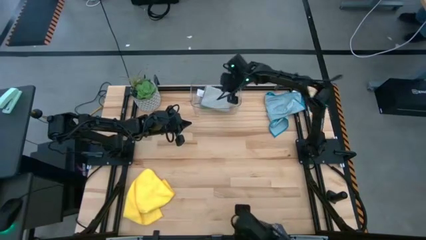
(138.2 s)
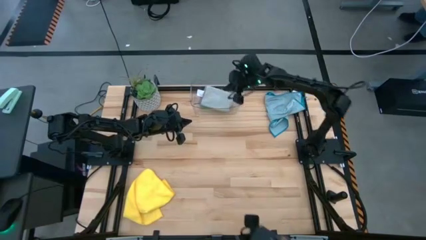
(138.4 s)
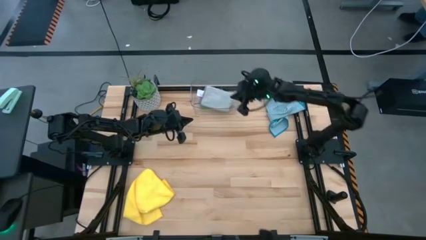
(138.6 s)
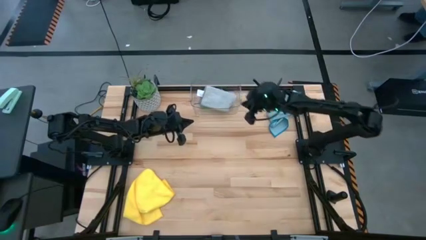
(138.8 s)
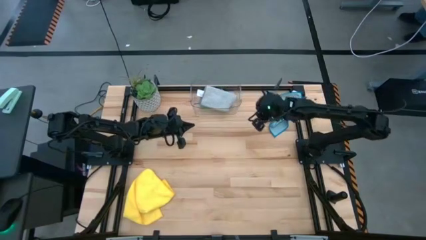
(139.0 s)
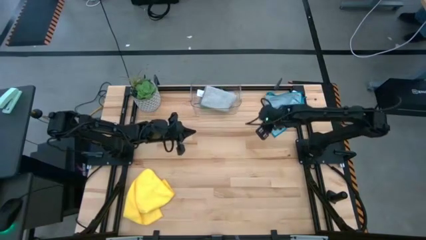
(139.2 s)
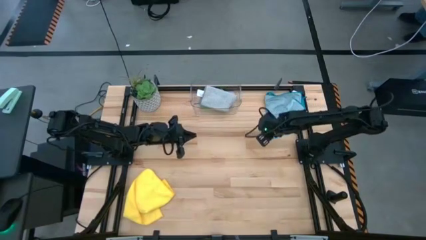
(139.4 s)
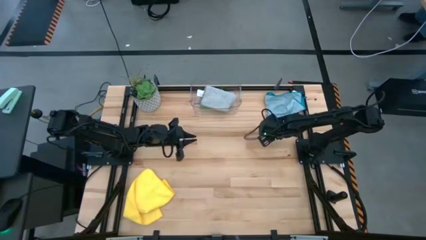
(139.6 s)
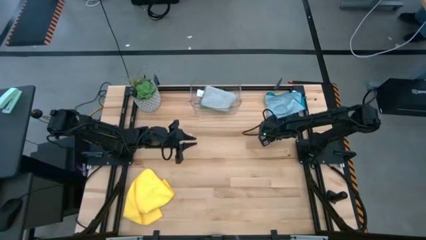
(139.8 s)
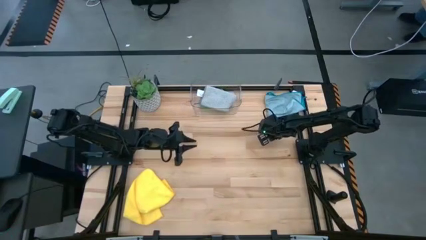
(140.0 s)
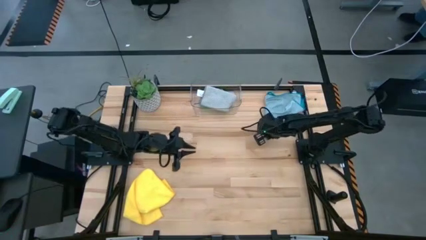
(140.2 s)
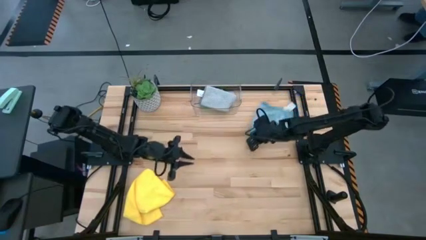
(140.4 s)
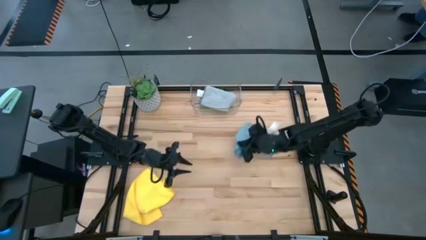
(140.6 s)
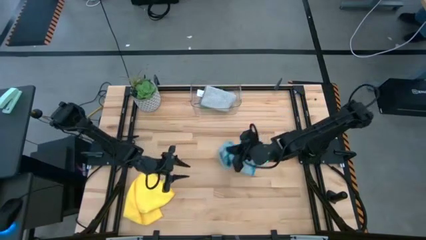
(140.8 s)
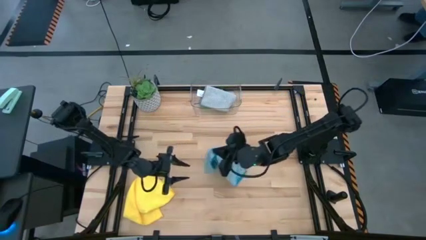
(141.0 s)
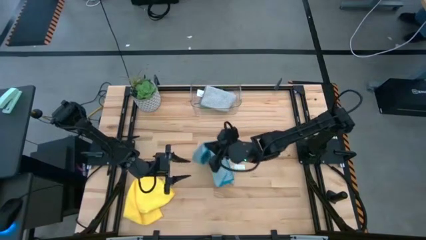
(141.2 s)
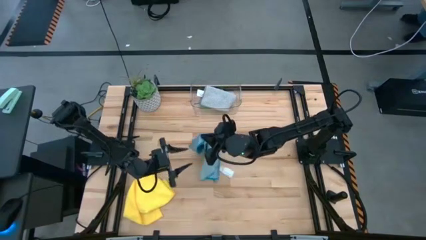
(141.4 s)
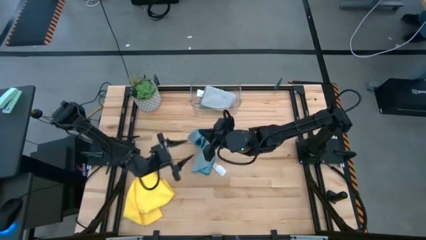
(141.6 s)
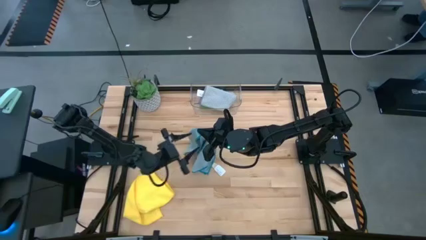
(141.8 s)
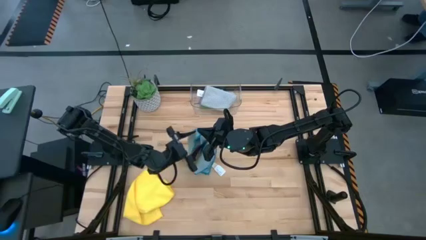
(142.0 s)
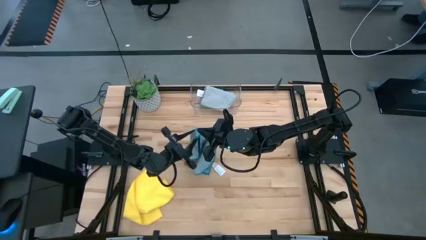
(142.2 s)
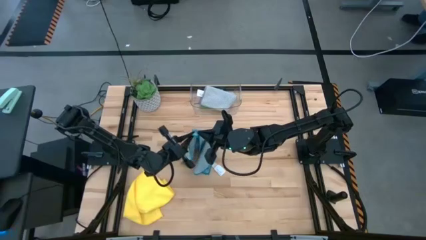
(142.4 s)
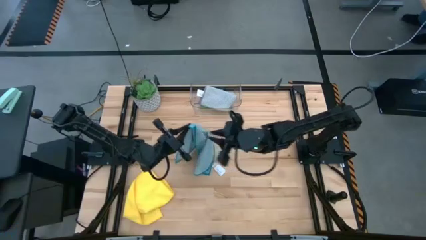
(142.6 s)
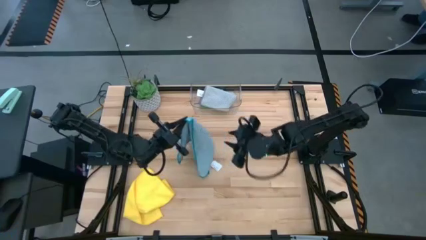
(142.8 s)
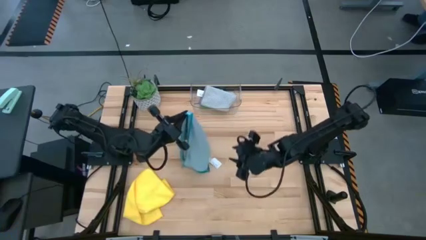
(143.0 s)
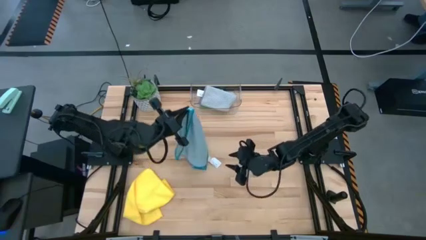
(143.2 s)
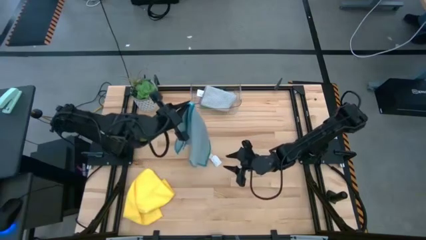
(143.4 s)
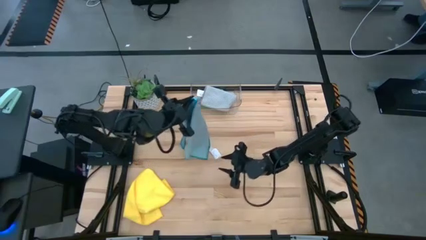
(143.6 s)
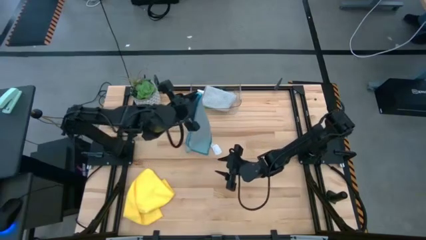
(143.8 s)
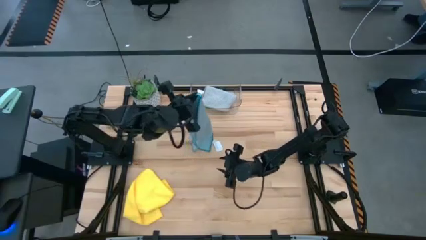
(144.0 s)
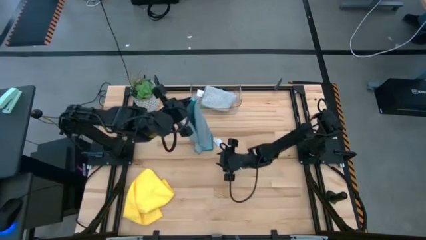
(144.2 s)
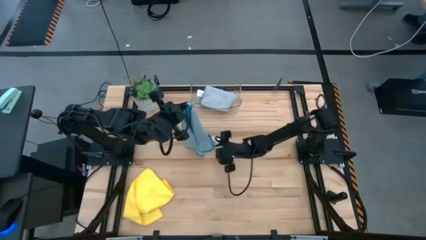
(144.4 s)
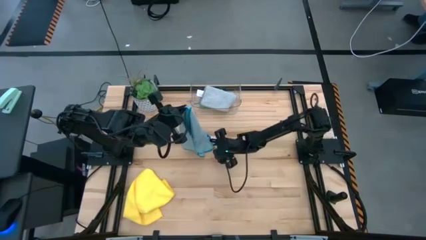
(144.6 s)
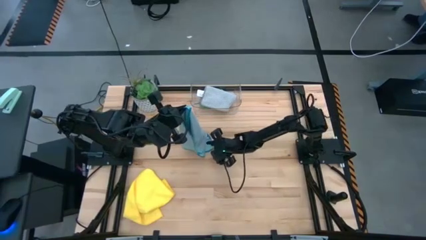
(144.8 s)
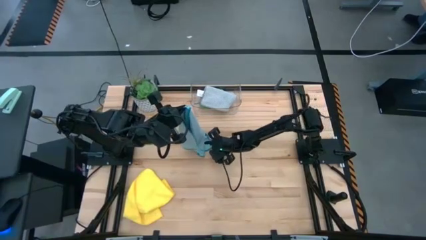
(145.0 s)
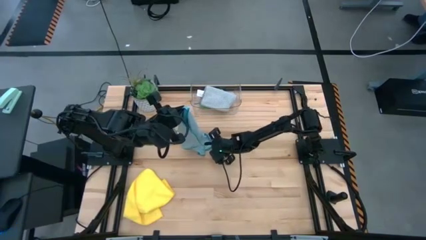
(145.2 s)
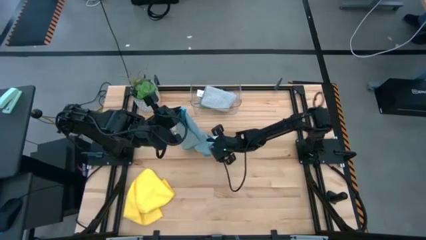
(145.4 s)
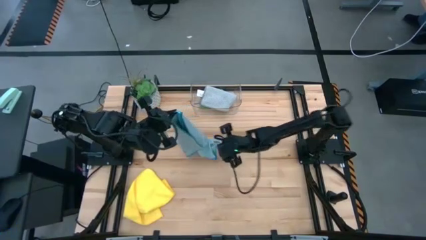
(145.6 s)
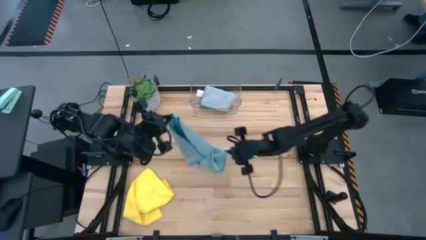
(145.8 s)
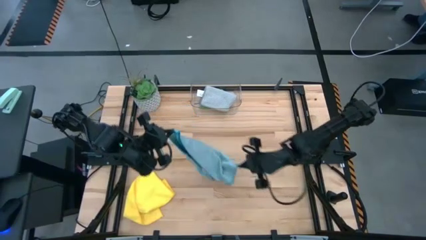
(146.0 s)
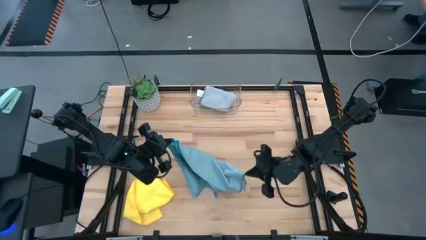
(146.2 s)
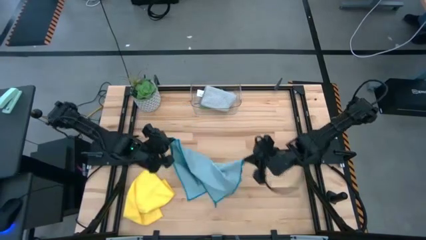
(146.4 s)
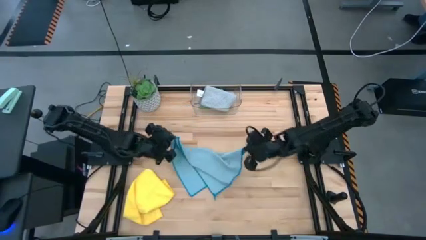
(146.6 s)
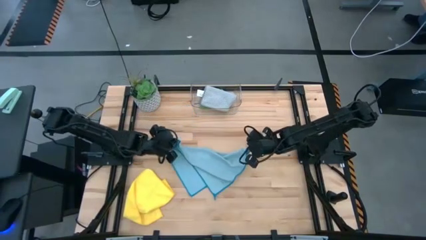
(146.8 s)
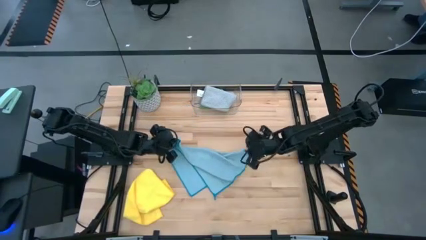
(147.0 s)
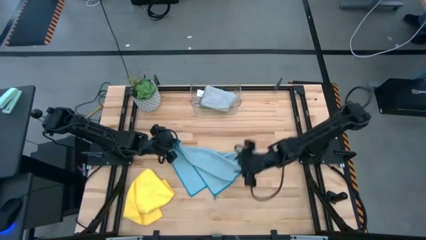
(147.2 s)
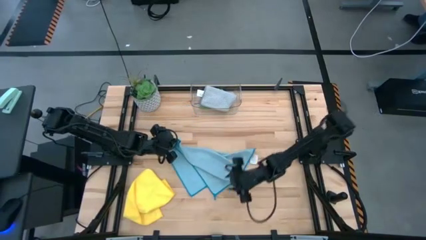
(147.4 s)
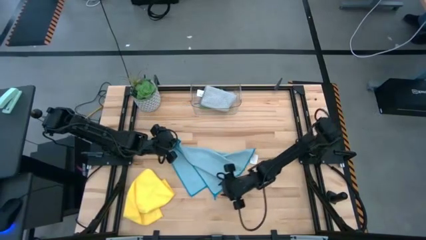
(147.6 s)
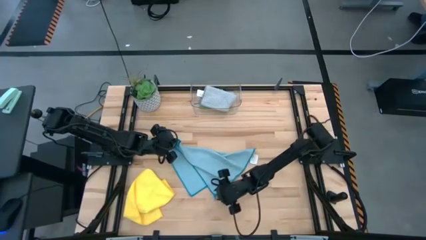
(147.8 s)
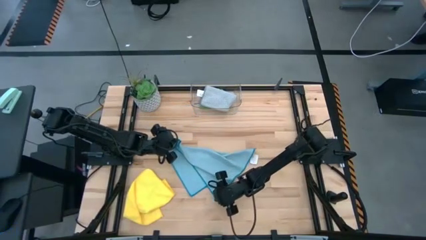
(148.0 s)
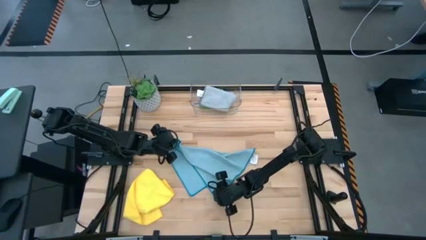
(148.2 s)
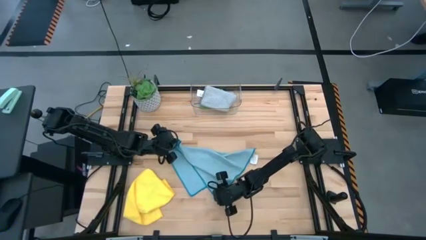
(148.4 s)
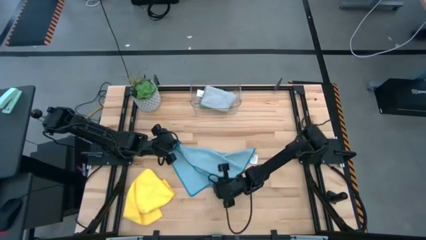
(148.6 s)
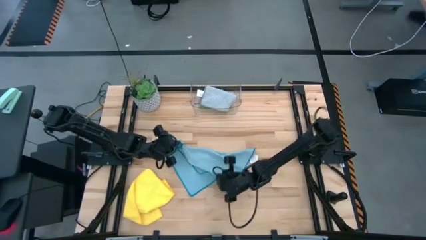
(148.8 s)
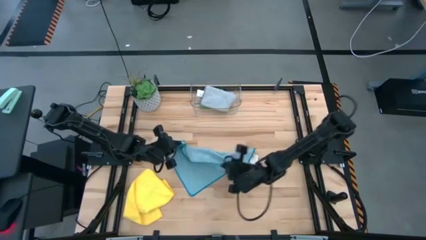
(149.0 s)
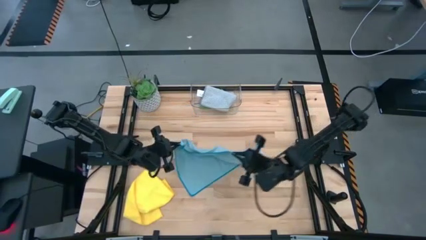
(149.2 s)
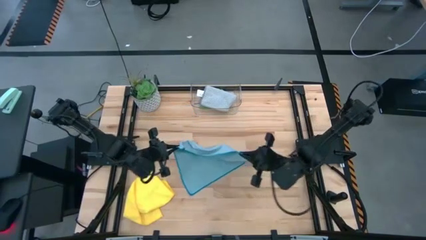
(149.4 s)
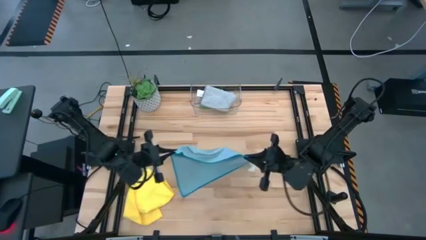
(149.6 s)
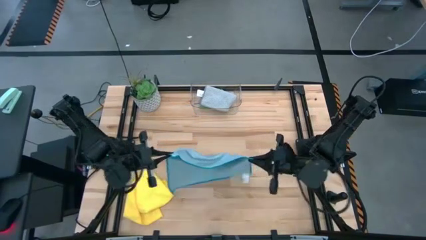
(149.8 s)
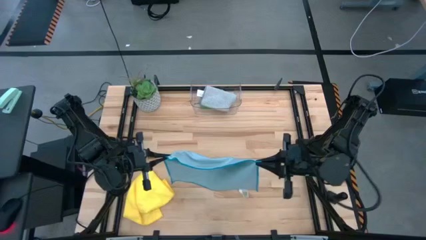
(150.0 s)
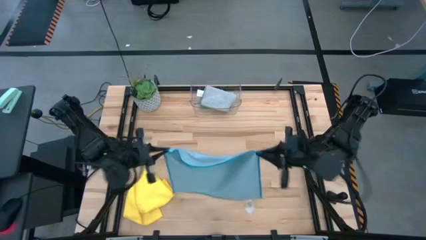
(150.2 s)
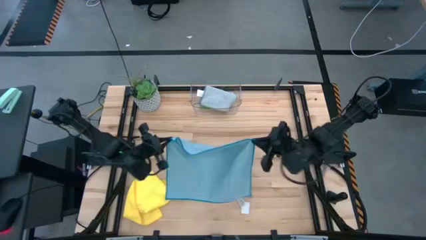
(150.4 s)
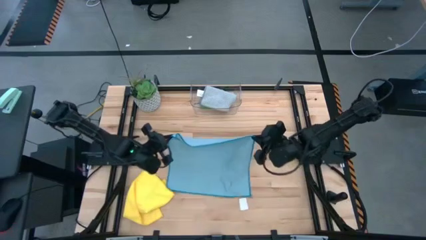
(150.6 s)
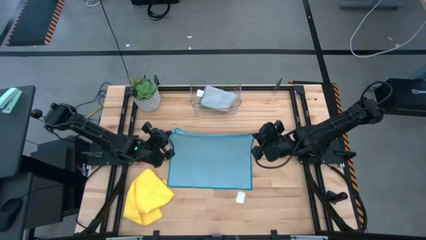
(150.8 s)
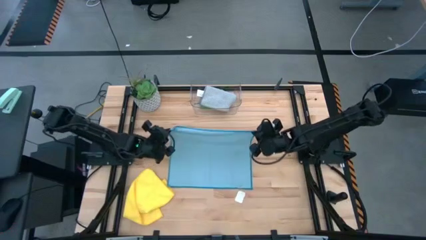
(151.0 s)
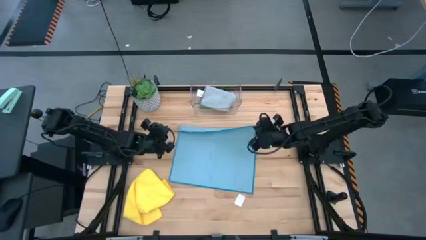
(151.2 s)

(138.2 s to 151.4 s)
Task: Fold microfiber towels
Fold the blue microfiber cloth

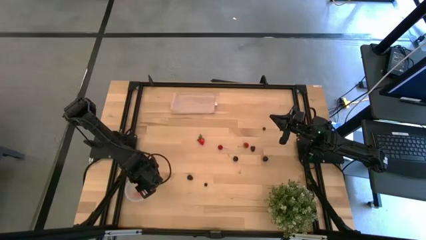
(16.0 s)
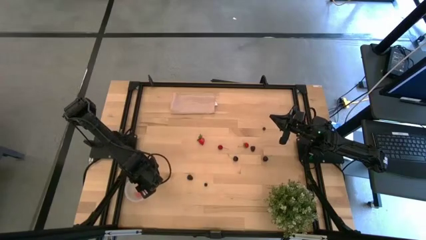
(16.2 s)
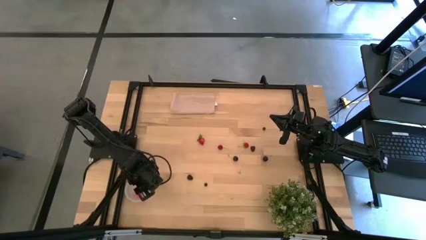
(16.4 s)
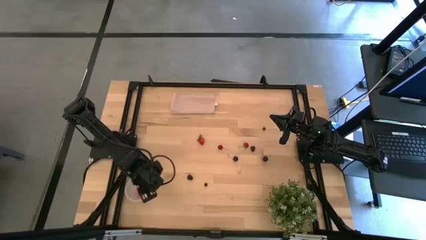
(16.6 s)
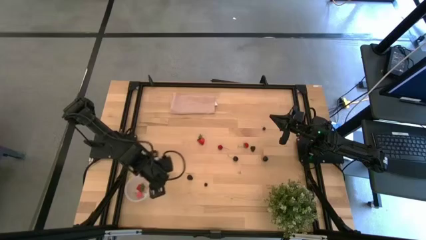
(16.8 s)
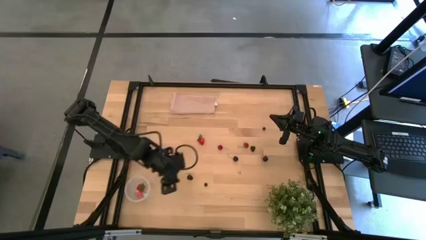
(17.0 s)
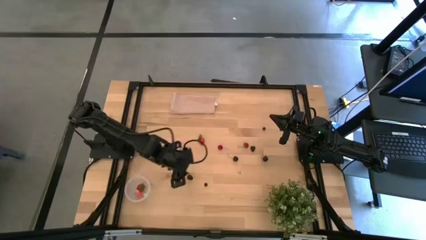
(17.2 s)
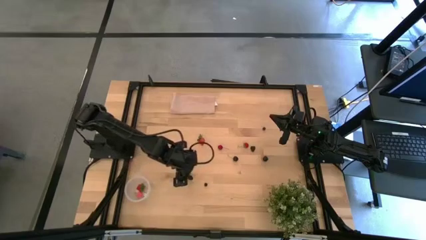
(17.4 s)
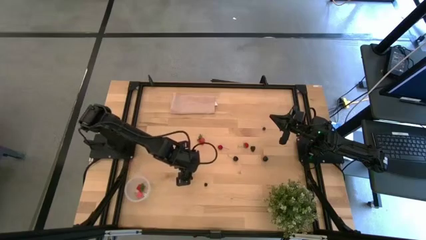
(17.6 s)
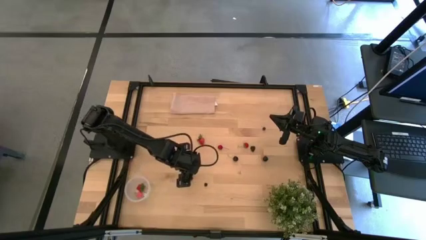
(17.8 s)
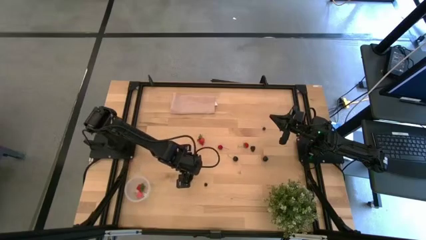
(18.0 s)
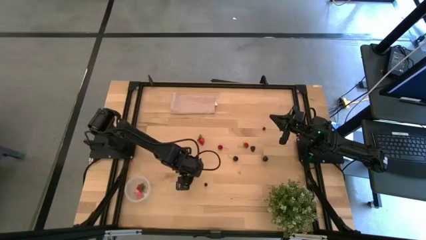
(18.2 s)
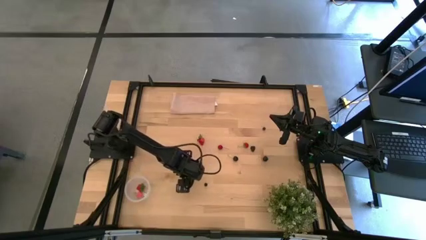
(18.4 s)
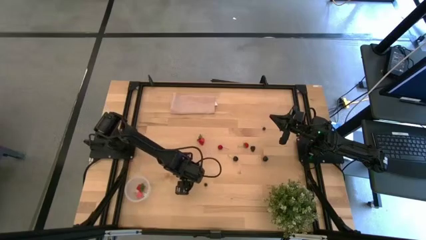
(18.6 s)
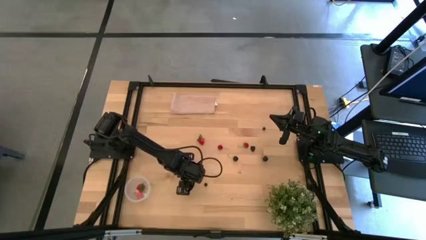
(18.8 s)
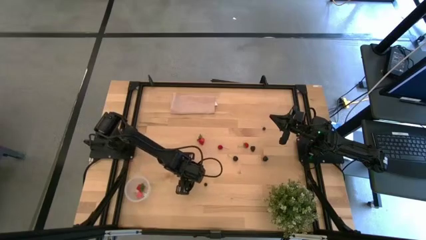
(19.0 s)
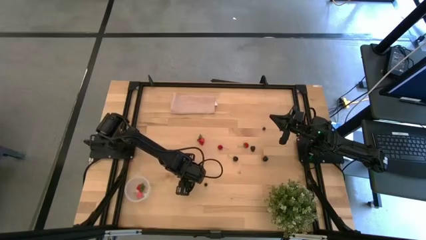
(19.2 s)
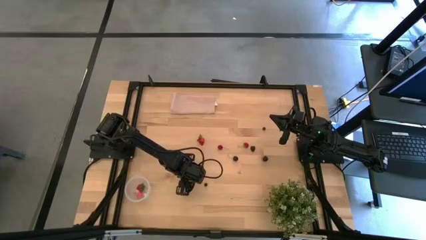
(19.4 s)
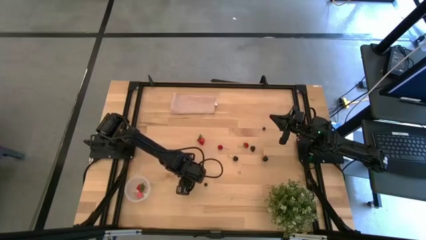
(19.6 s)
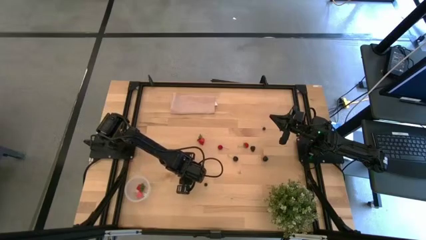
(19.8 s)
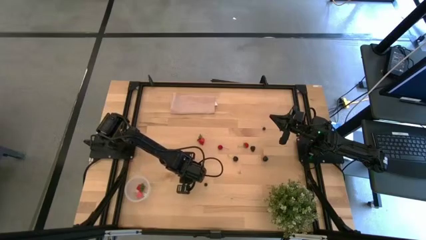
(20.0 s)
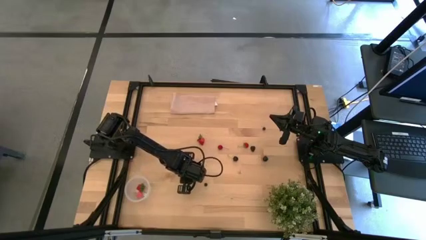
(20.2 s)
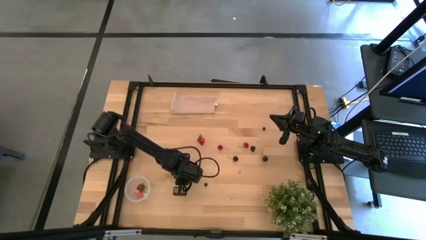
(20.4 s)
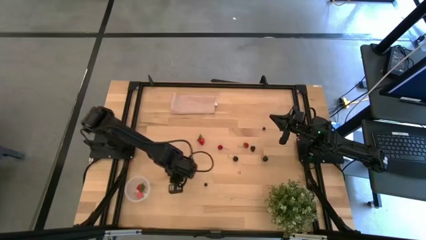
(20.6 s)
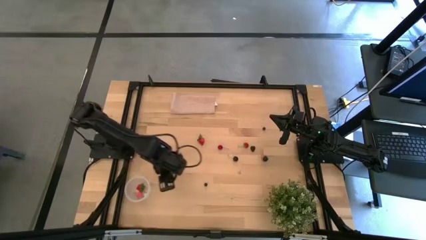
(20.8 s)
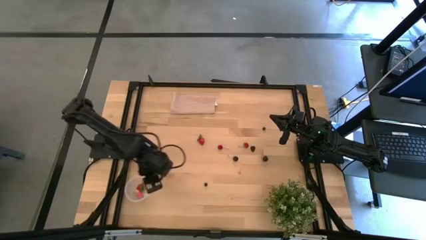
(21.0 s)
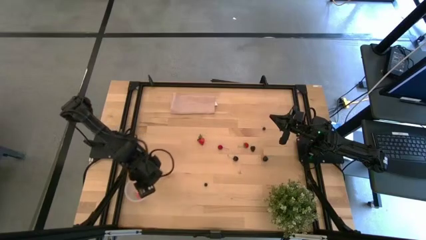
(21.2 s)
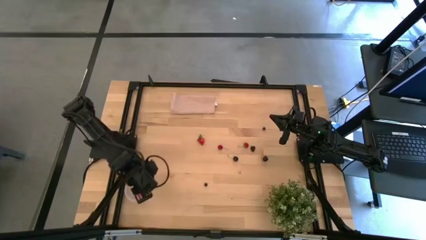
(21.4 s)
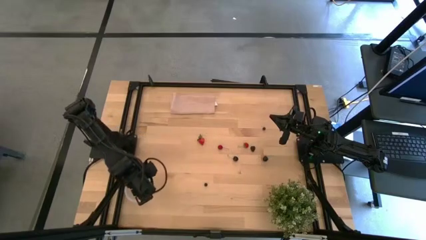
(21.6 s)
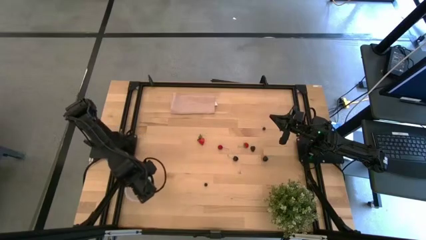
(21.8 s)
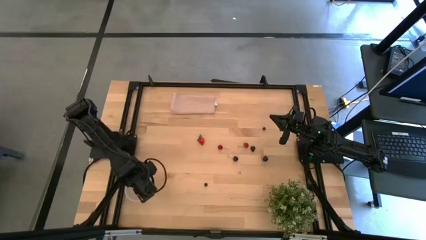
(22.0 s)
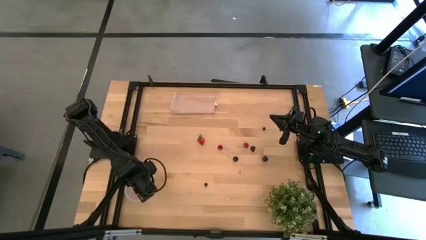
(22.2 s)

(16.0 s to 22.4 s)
Task: Pick and placing Produce into tupperware
Put the bottom blackberry into the transparent bin
